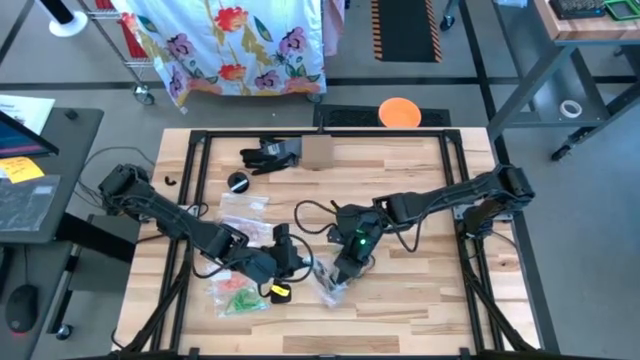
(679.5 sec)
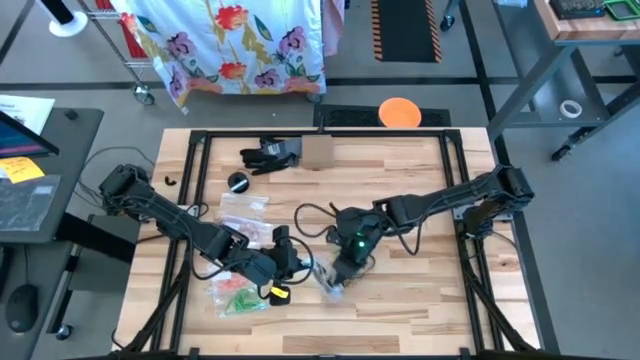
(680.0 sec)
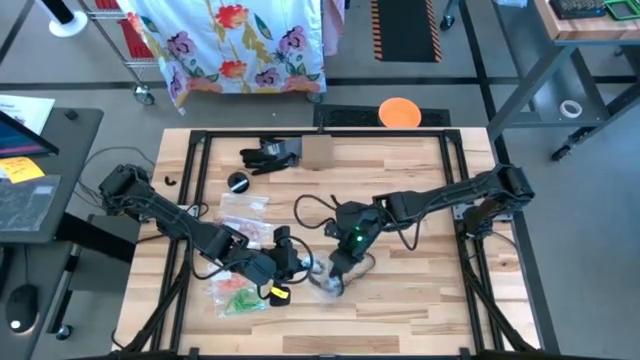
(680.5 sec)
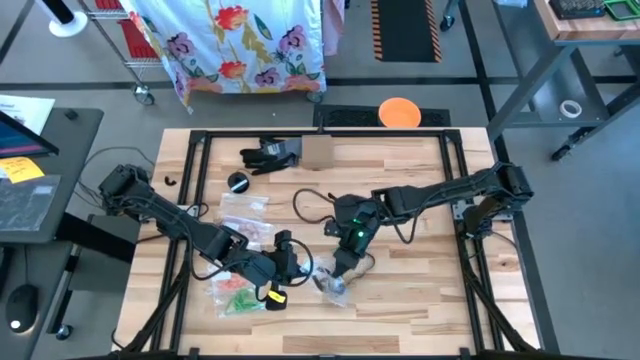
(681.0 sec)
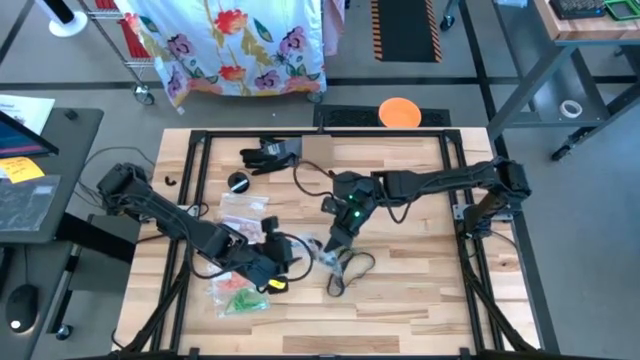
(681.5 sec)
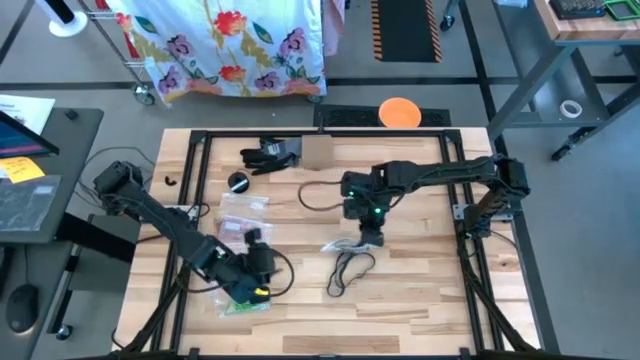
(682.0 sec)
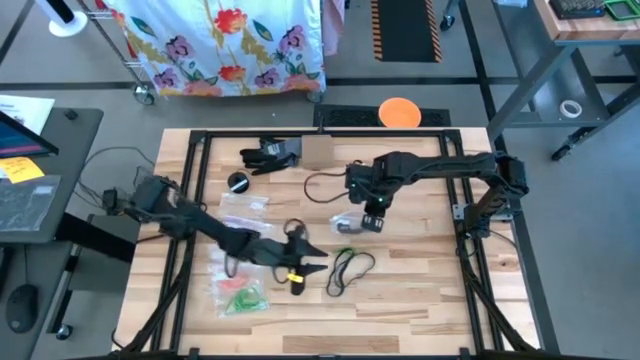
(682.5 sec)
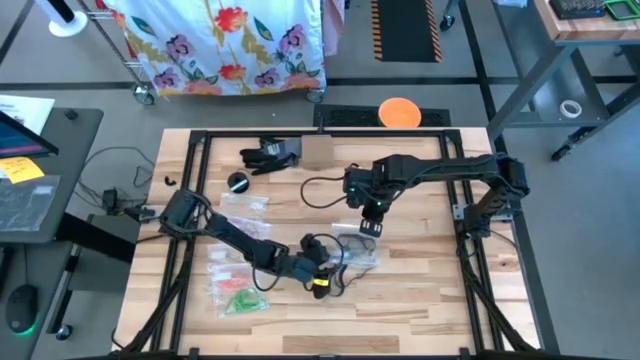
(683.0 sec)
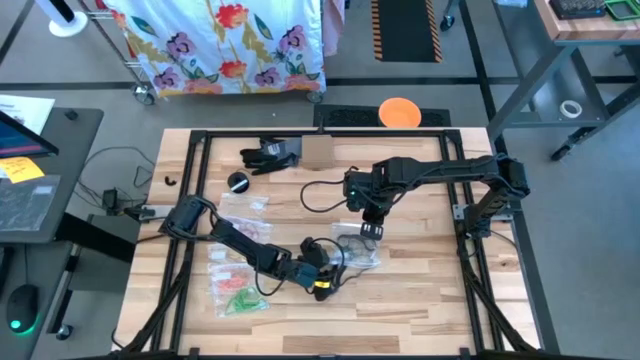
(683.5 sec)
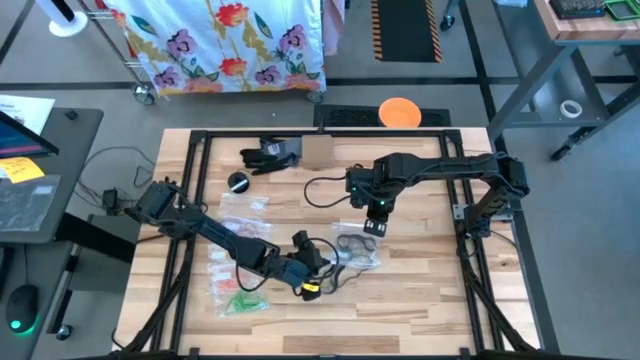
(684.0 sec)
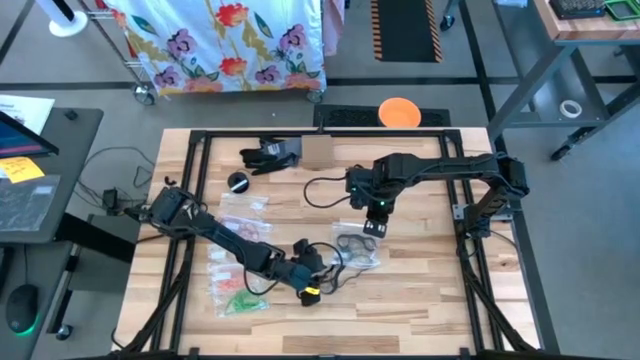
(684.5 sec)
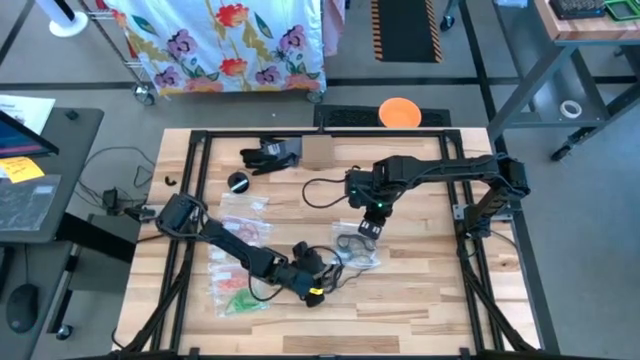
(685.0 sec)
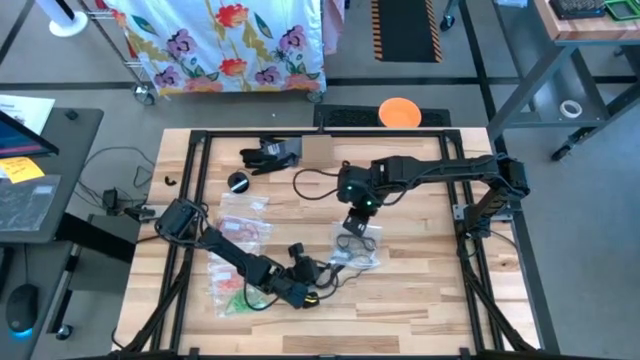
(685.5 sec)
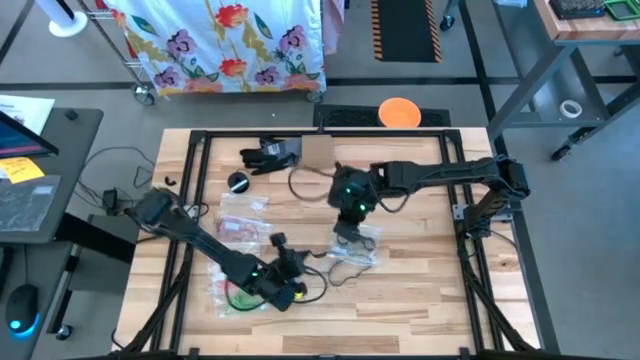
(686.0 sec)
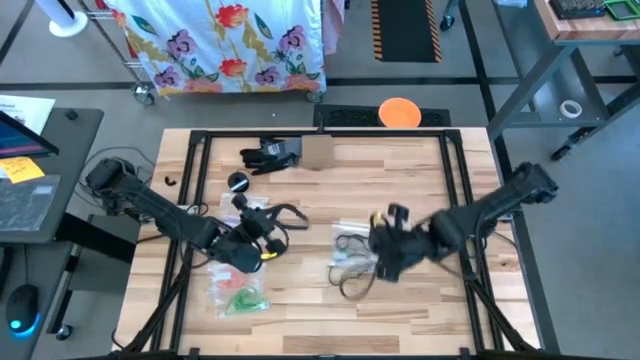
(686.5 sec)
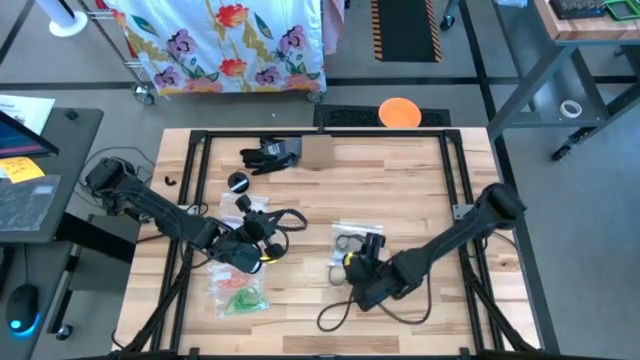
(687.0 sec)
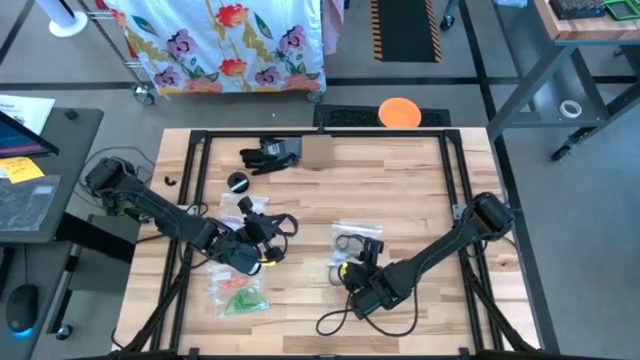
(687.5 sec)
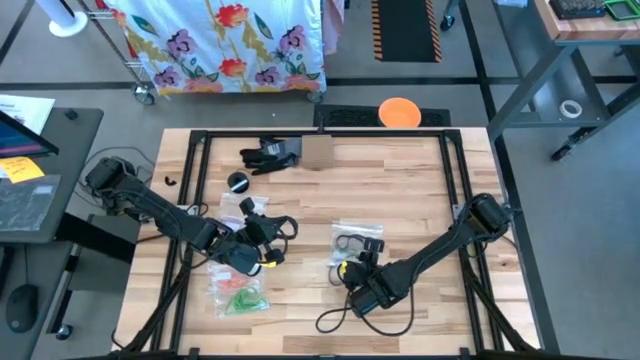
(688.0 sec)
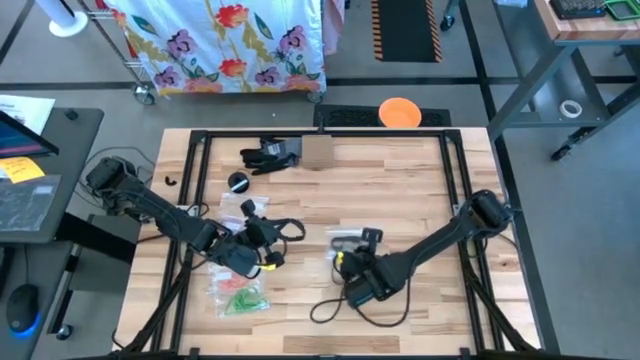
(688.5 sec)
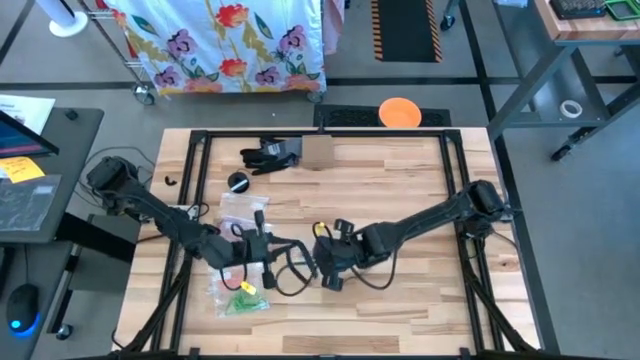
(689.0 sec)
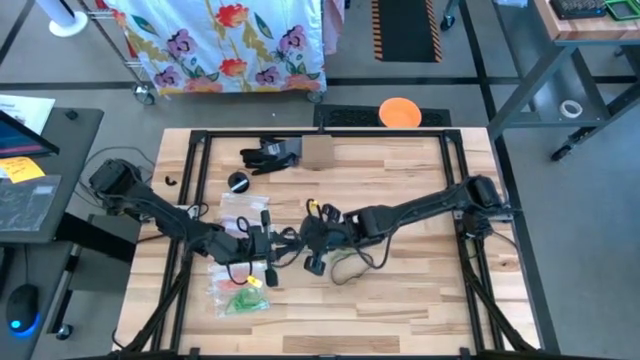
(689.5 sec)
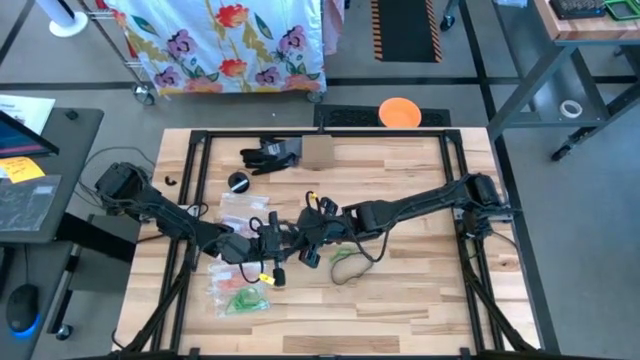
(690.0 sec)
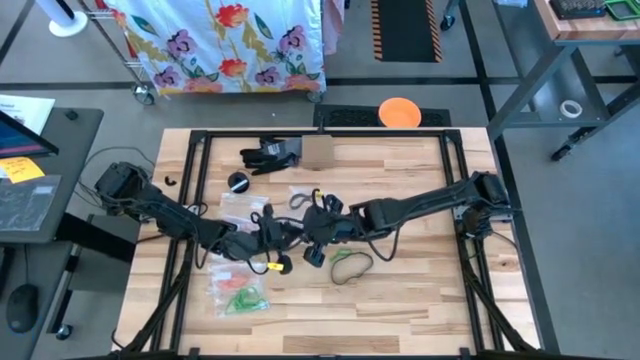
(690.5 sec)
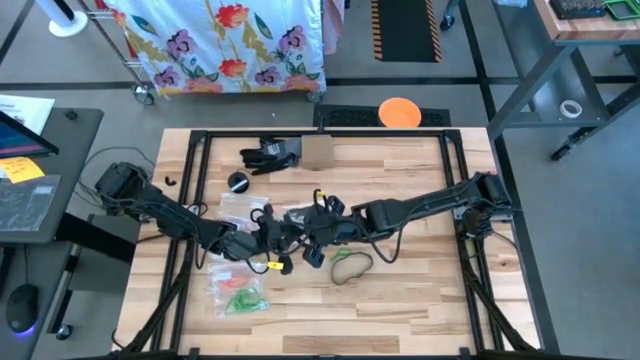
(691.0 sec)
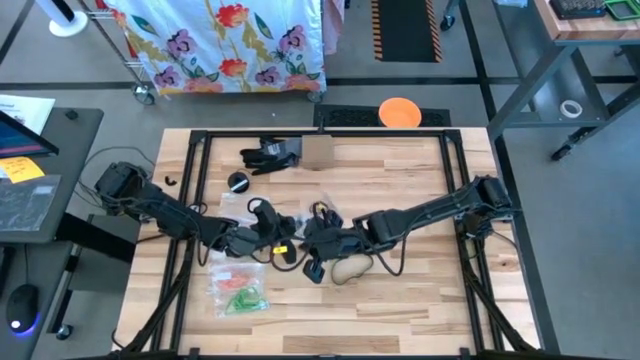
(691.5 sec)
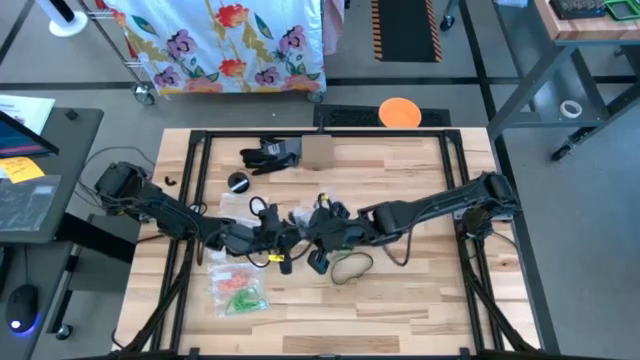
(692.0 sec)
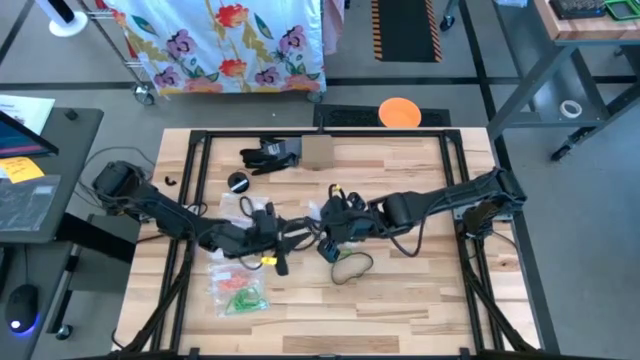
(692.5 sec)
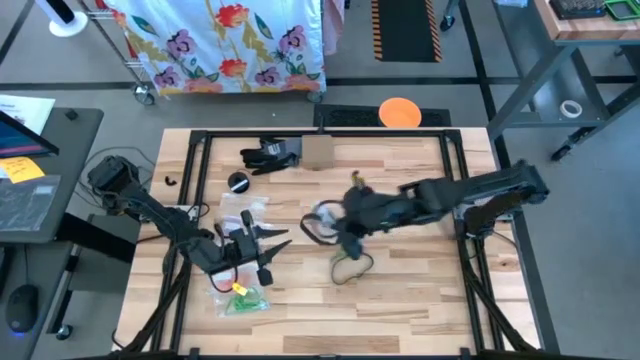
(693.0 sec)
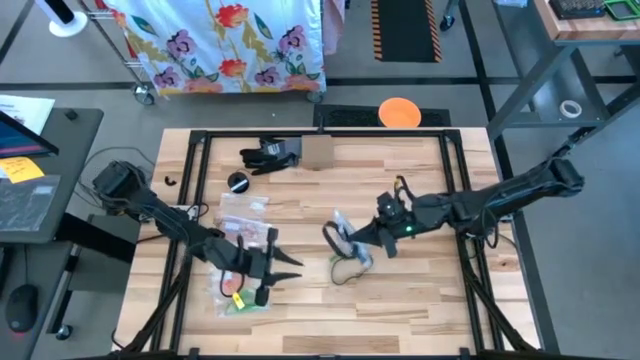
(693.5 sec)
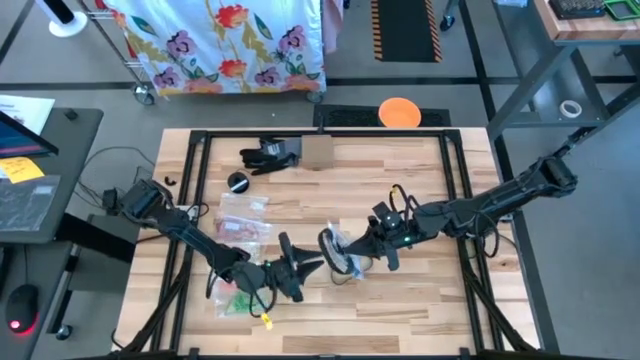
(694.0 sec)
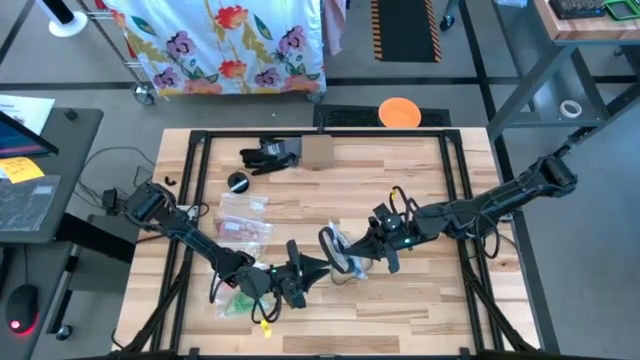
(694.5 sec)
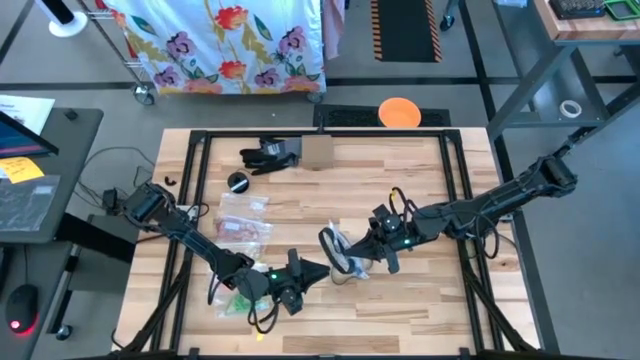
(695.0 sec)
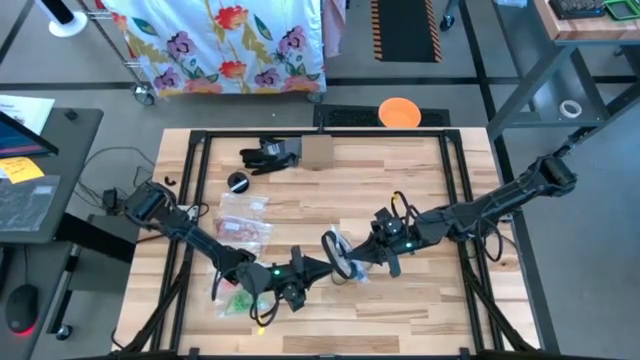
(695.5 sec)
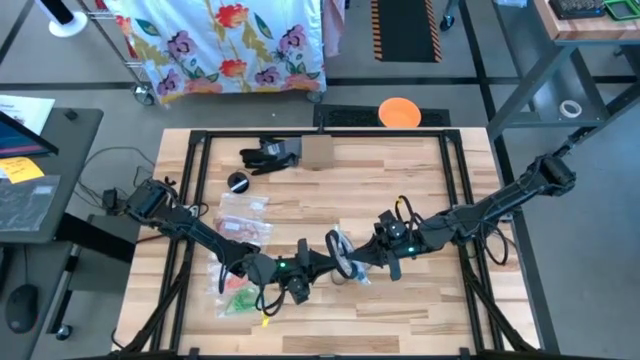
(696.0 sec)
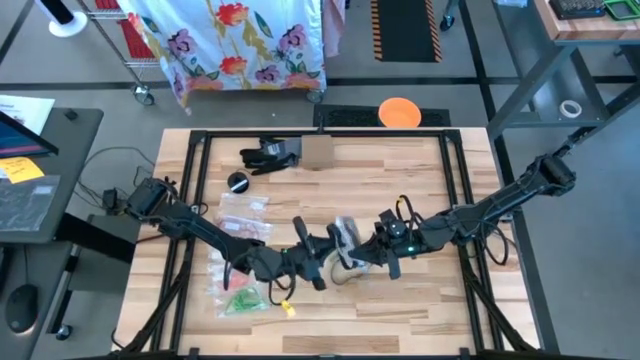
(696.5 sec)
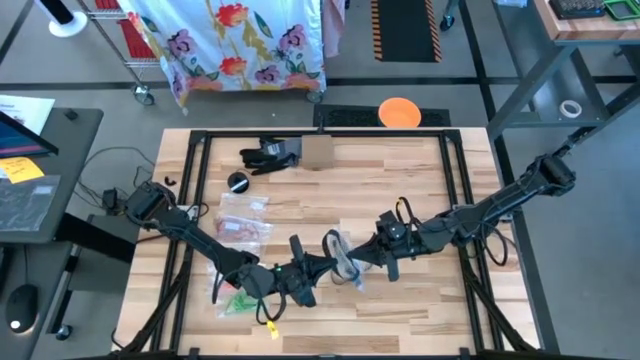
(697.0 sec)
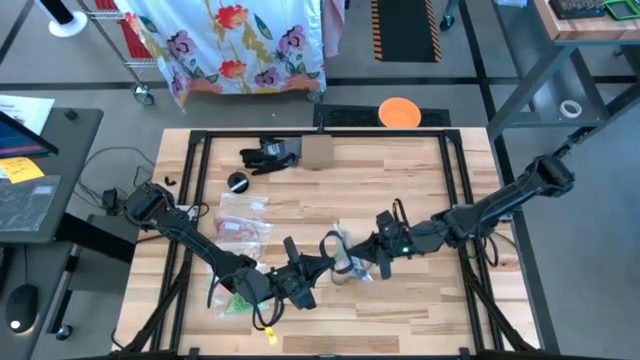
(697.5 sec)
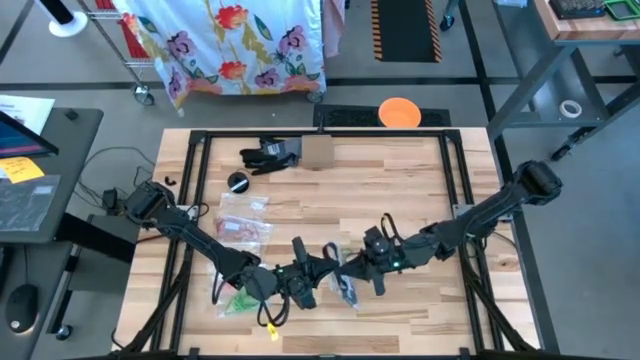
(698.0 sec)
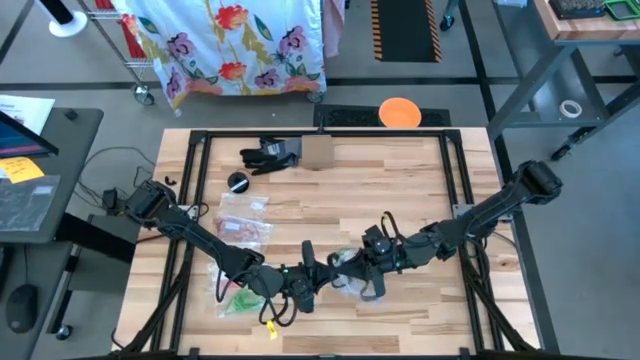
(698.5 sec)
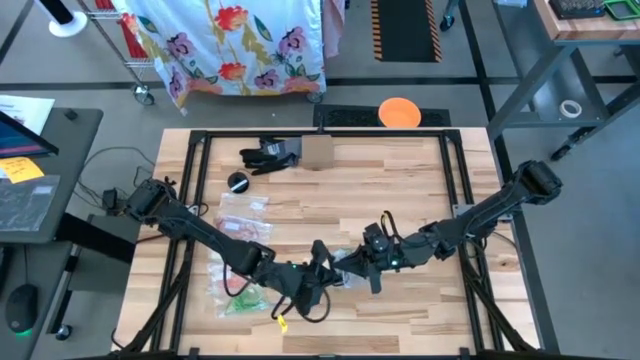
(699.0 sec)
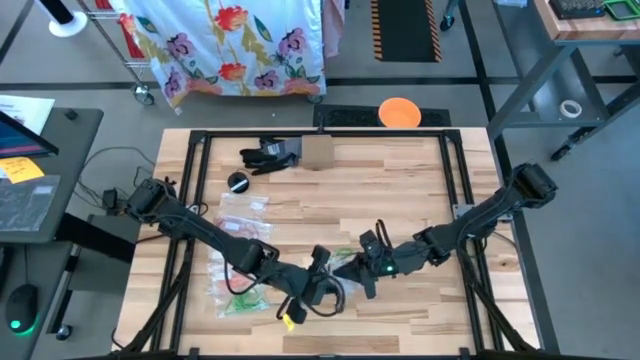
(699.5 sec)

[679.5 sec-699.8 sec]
Task: Sort rubber bands
Put the black rubber band into the transparent zip bag

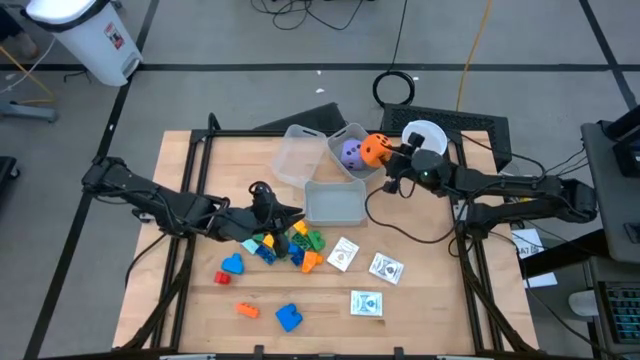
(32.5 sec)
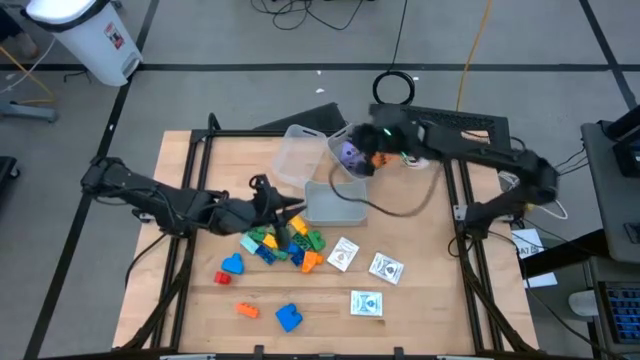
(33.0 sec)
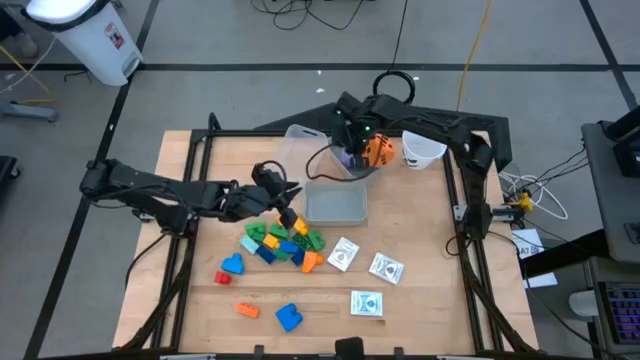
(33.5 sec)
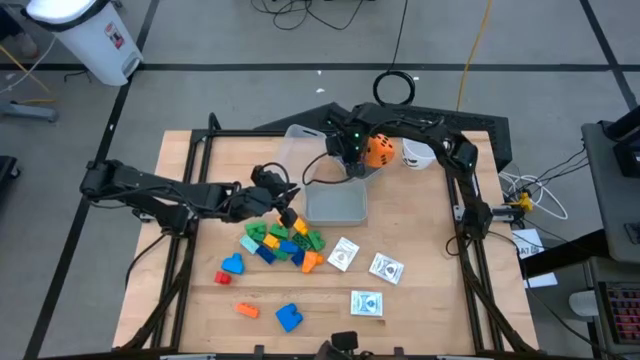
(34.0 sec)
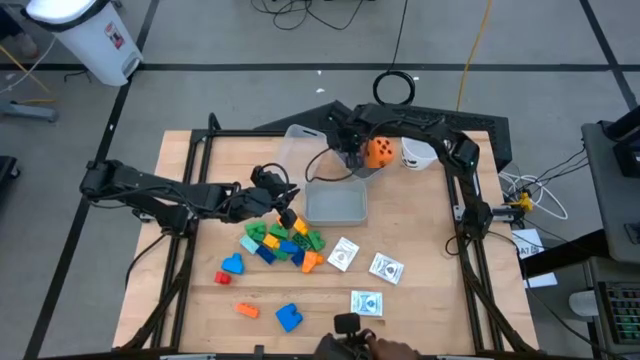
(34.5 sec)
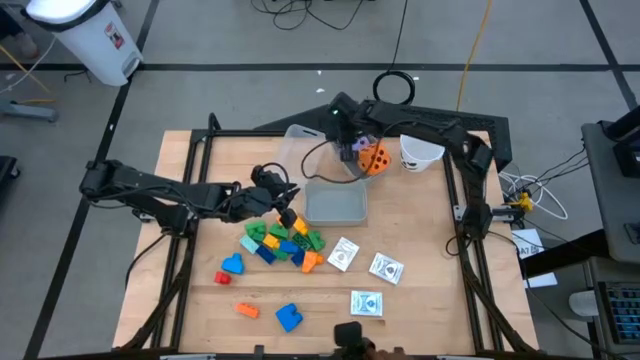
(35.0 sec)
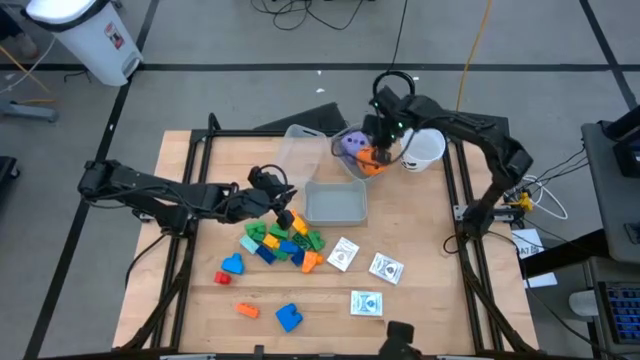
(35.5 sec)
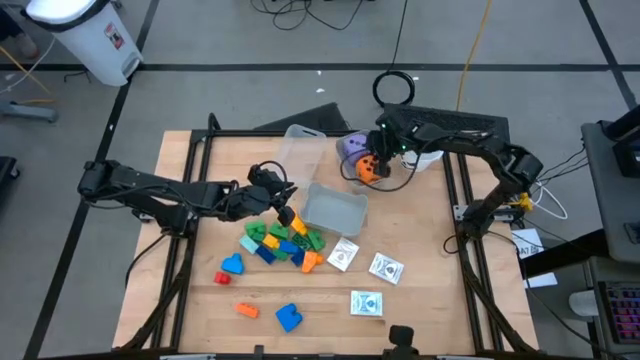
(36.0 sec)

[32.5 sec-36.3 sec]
Task: Pick & Place Toys
Adjust the dice in the top gray bin
